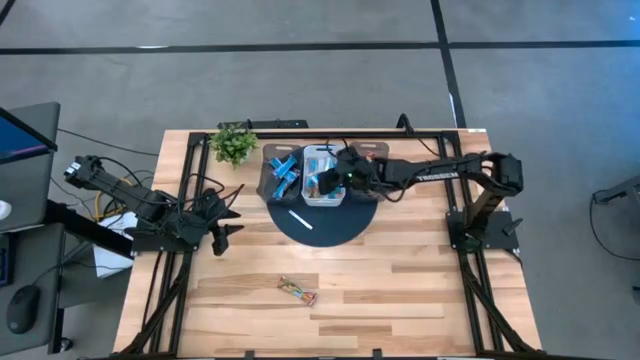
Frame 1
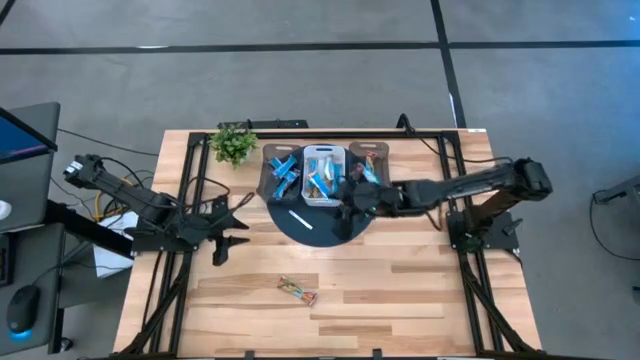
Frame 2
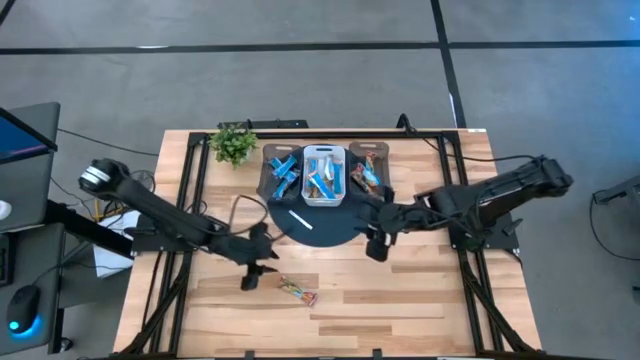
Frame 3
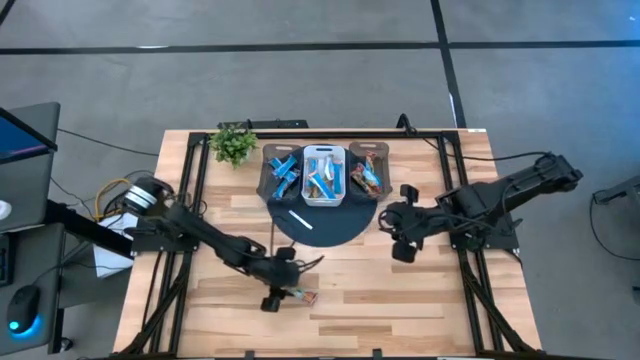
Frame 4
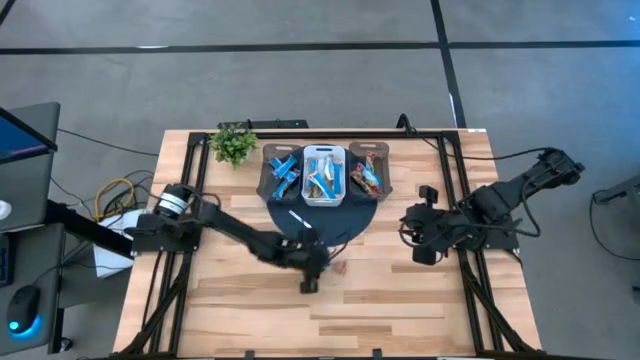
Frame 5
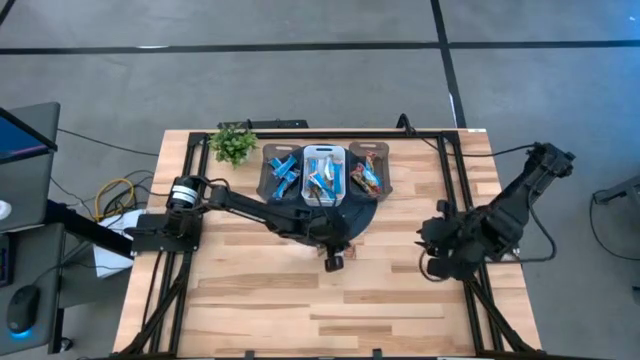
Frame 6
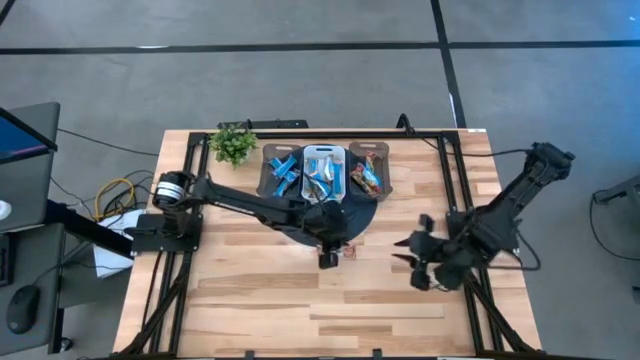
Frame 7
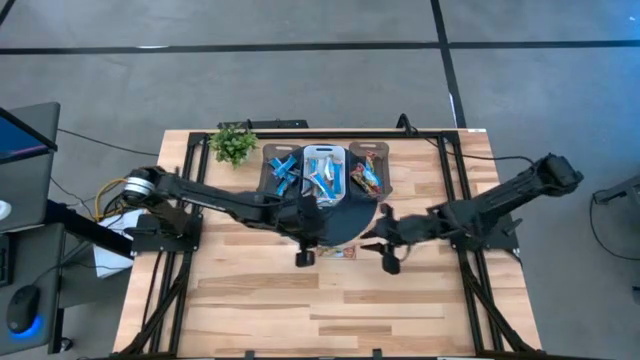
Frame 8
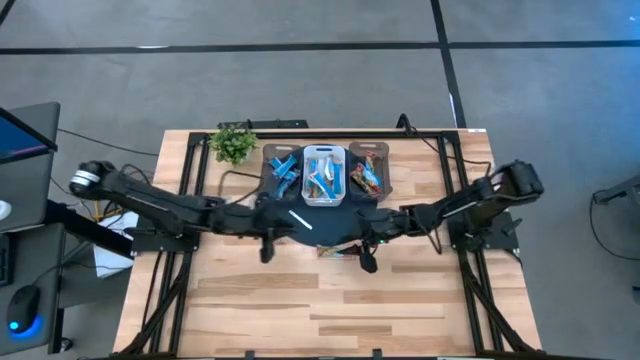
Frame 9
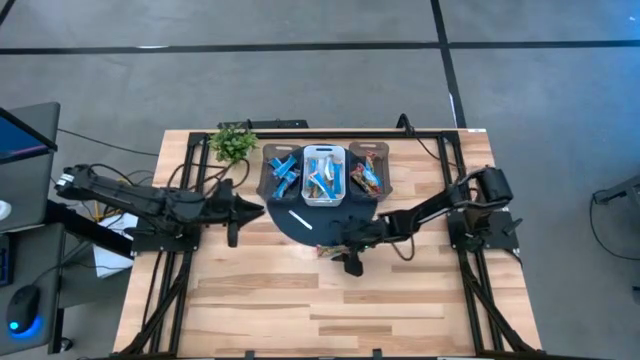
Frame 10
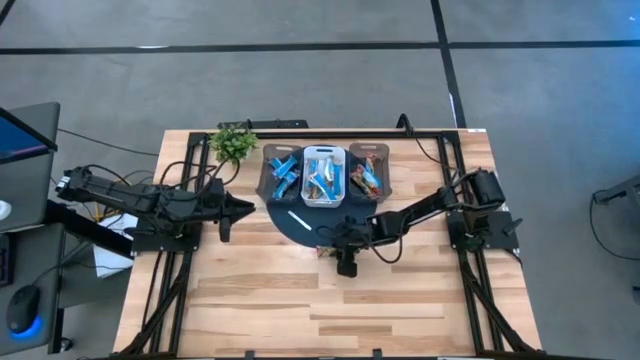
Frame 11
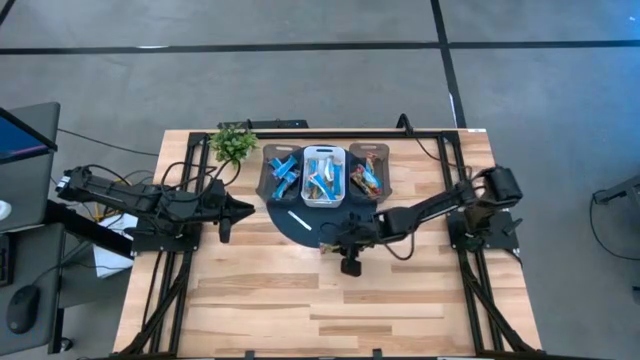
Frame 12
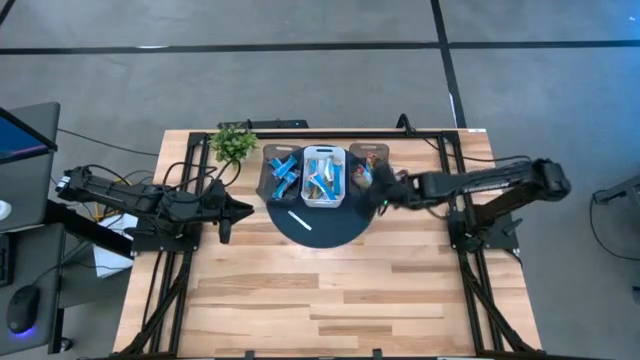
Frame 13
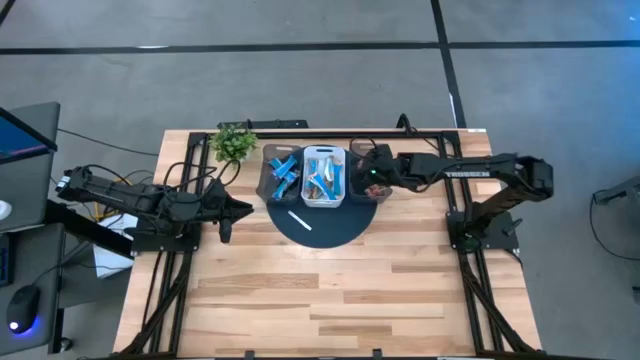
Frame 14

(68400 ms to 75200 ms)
Task: Pick and place Granola Bars by type
Put the red granola bar into the right black bin

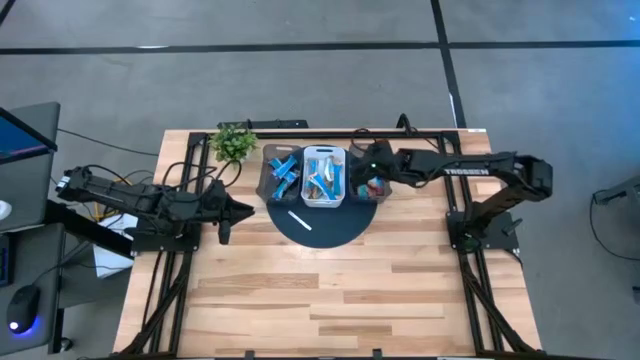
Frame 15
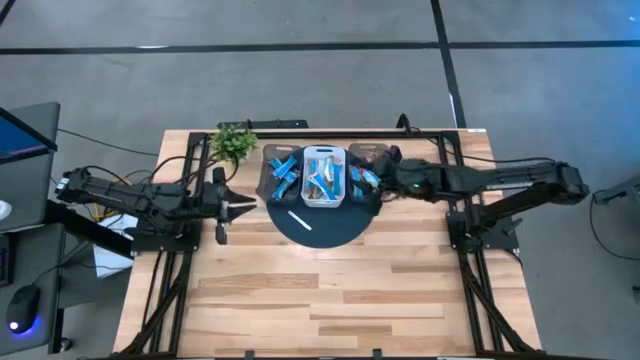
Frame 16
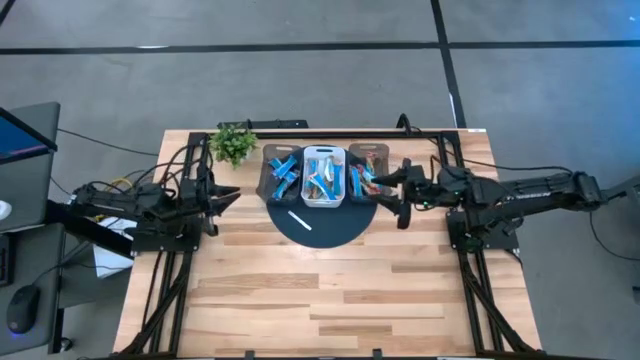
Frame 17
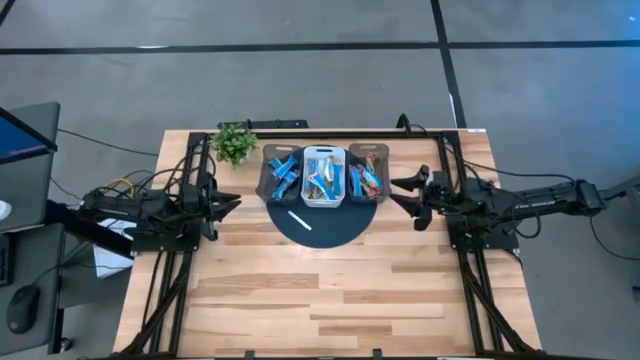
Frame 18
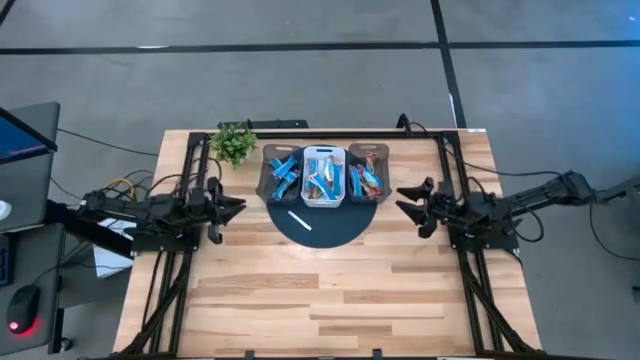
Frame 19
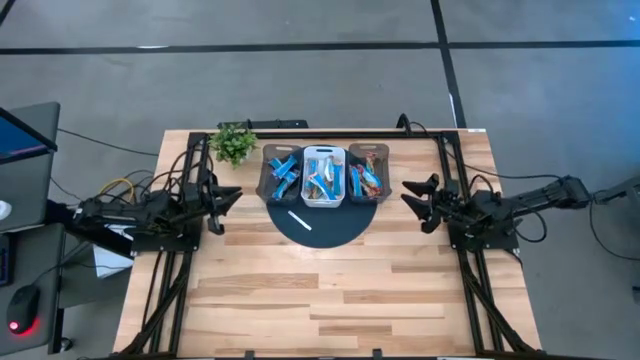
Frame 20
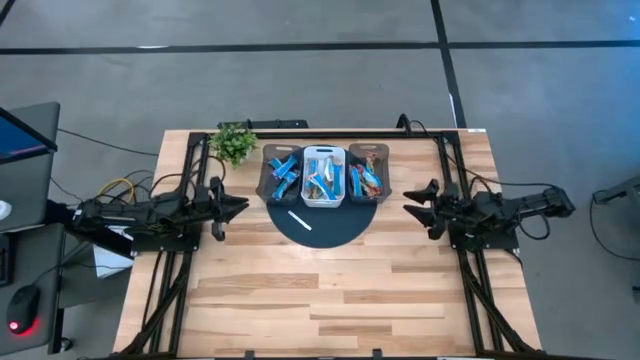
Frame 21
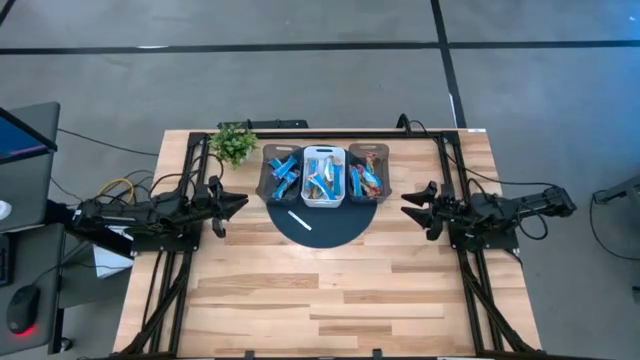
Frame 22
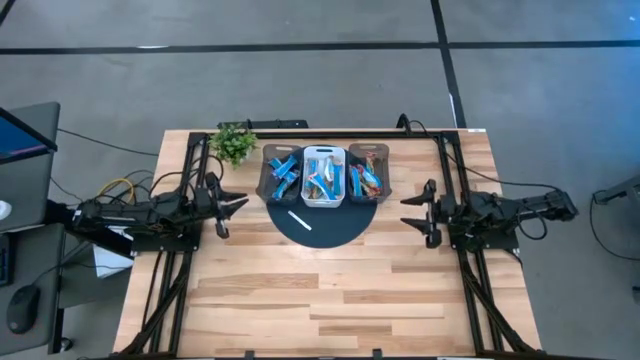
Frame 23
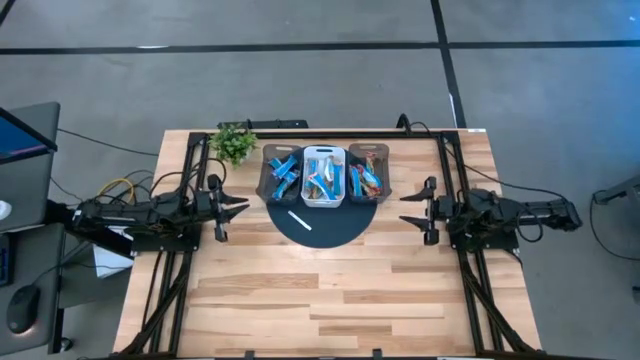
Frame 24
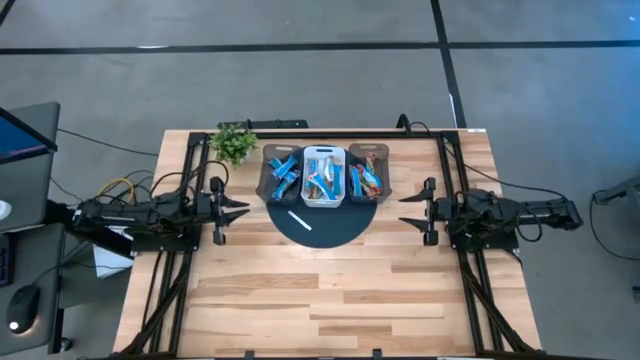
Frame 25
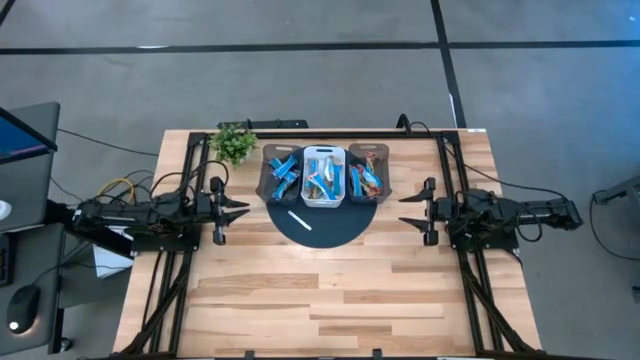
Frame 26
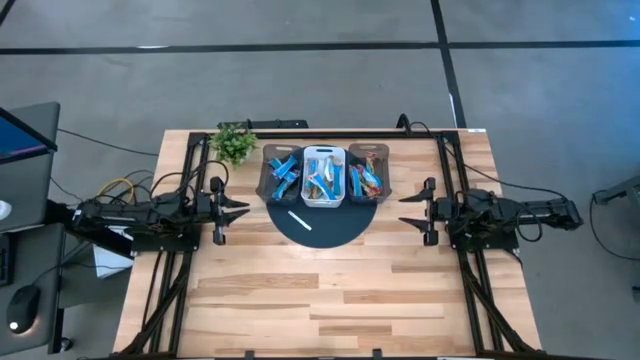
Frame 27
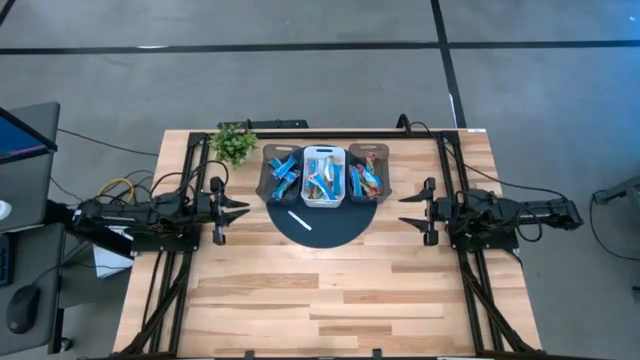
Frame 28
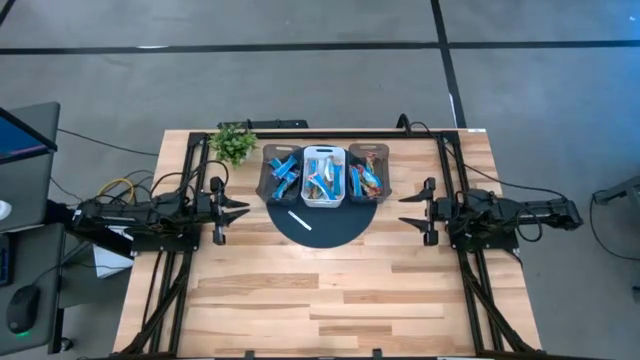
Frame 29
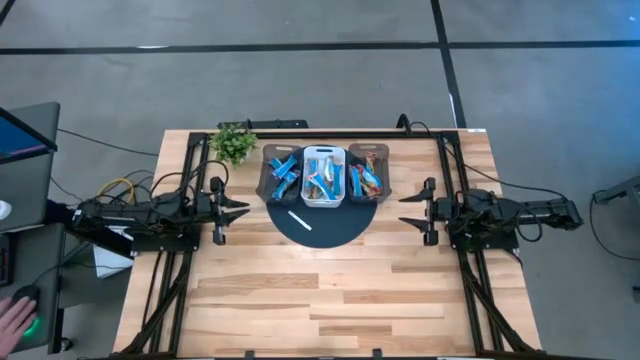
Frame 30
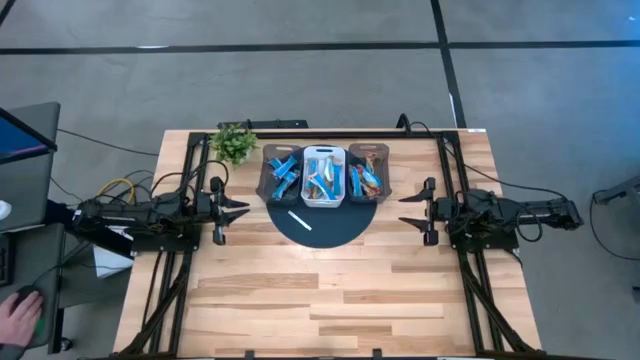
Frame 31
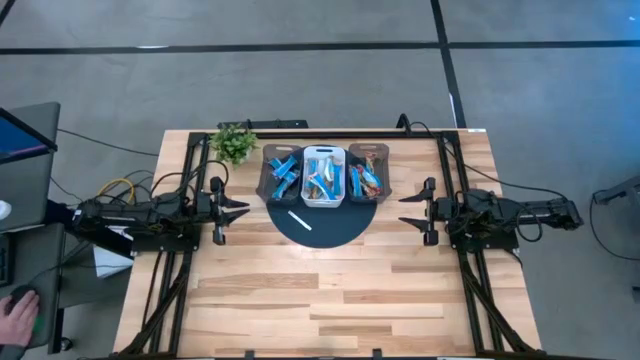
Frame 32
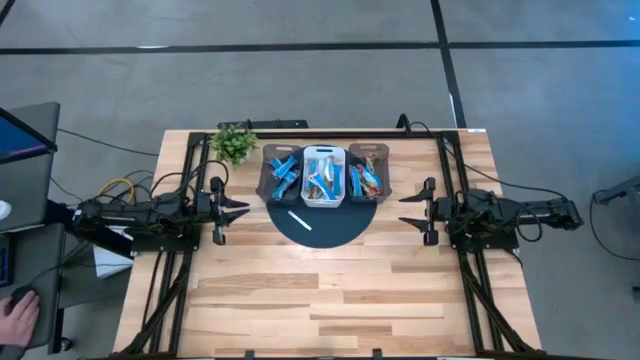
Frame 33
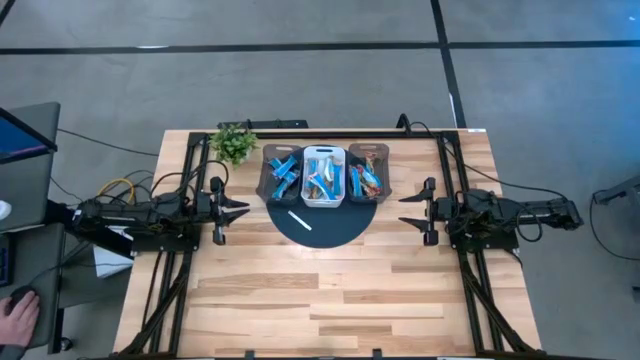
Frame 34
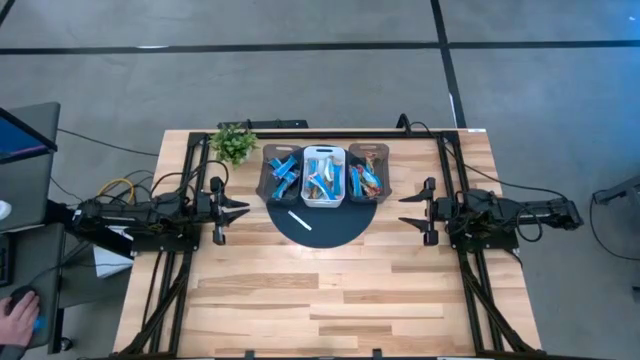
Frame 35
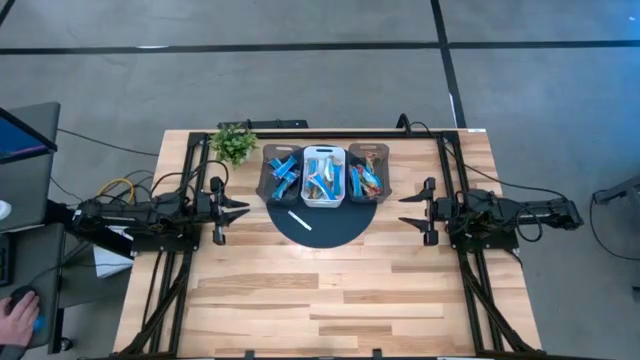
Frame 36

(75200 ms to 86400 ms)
Return to Home Position

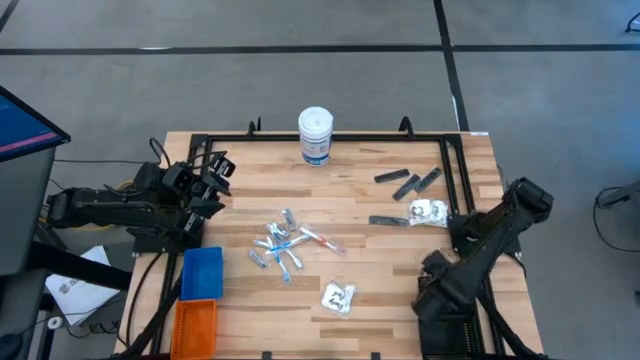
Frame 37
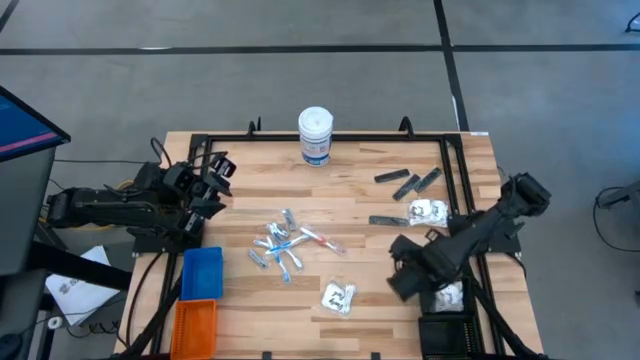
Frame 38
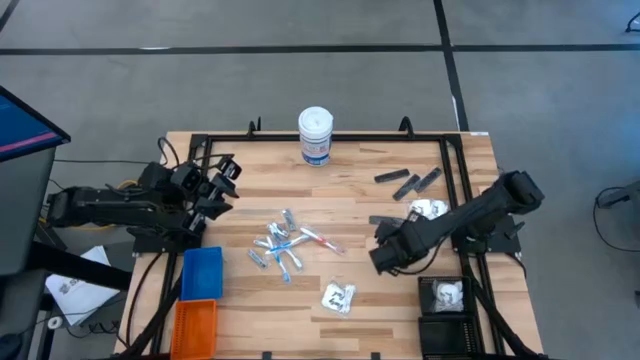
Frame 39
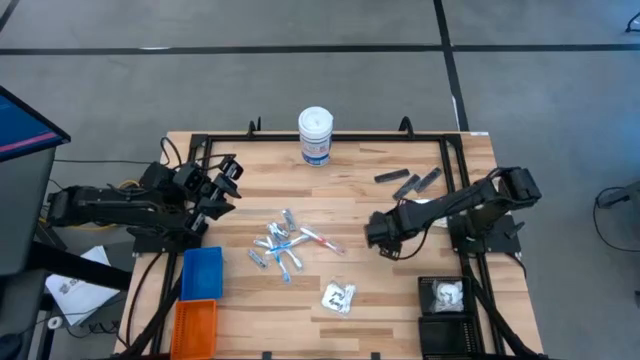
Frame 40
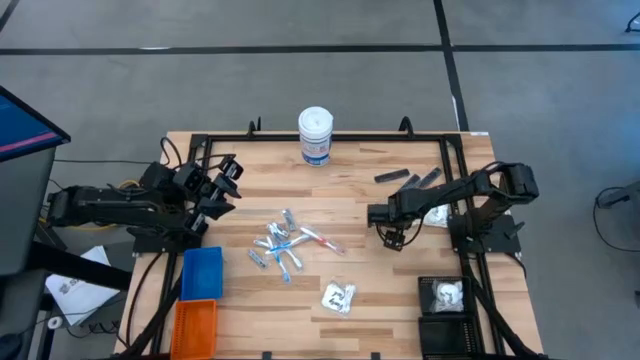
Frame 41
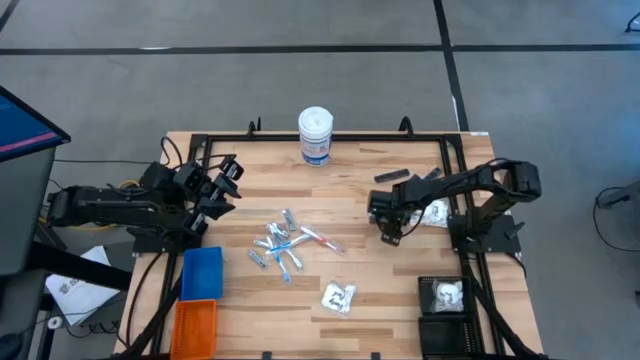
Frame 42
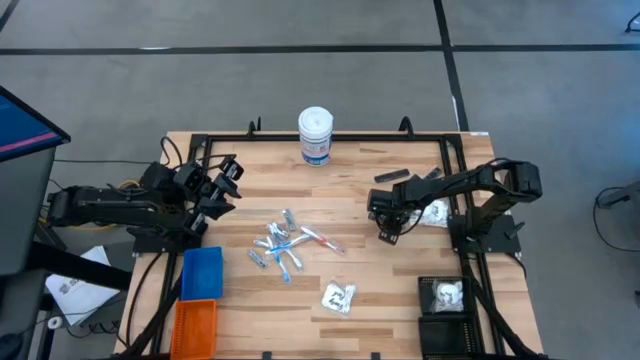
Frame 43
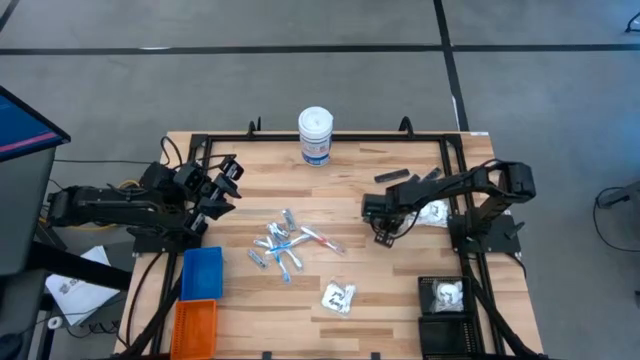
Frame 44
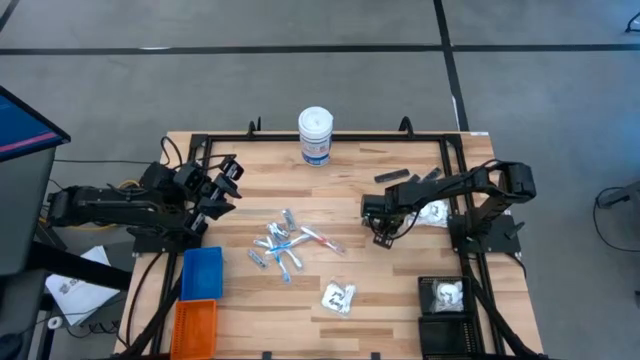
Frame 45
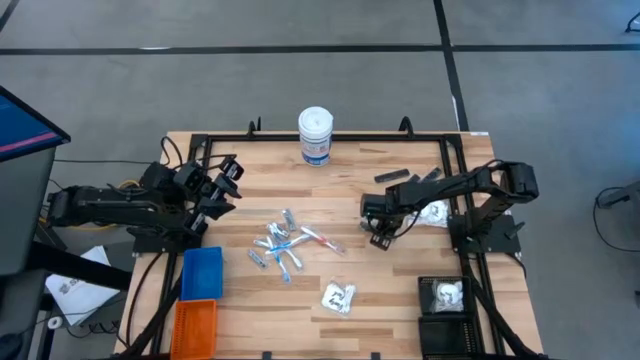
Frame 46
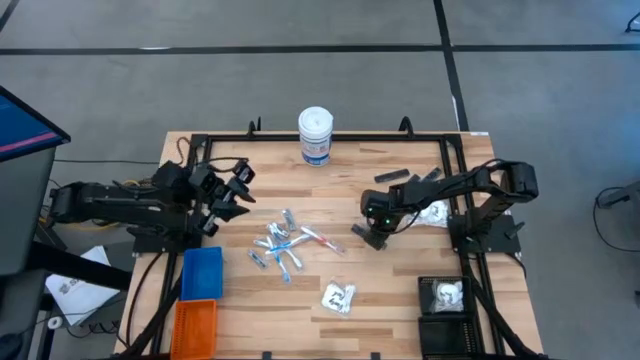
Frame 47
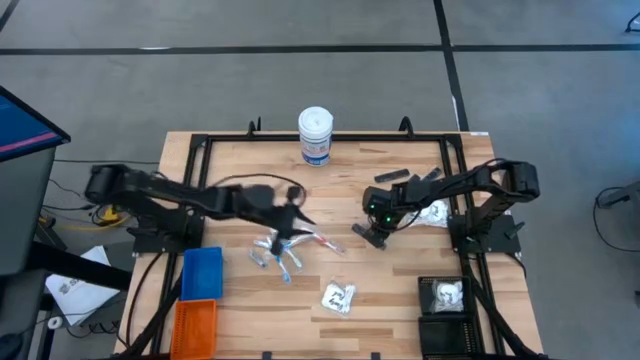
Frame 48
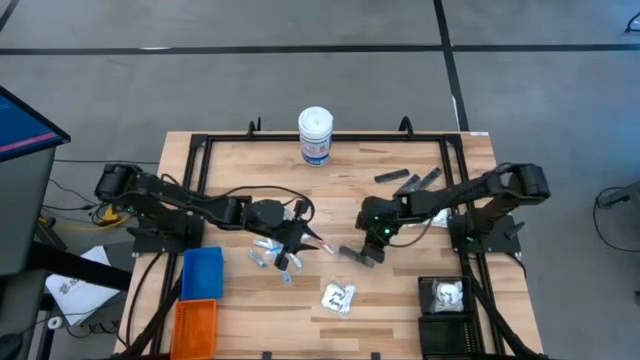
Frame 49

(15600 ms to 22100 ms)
Task: Pick & Place Travel size toiletries
Put the black comb into the bottom black bin
